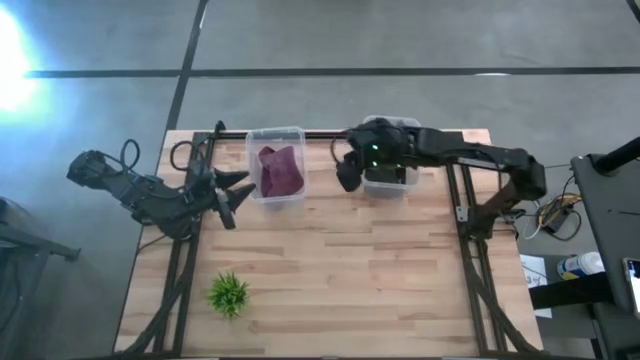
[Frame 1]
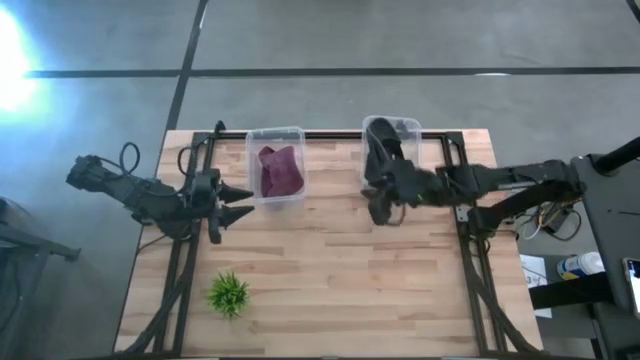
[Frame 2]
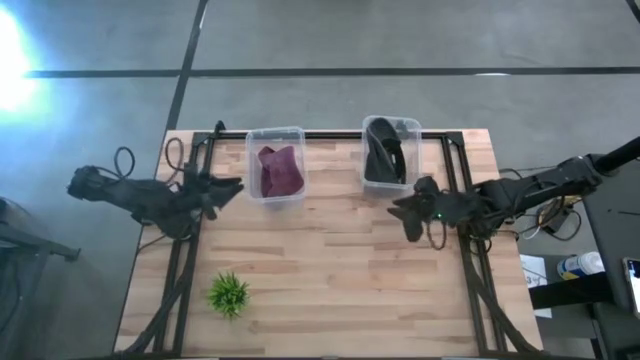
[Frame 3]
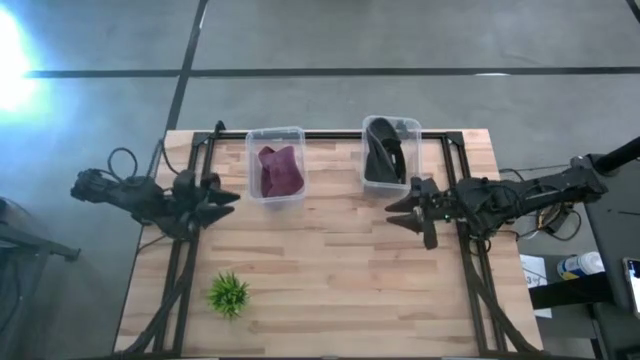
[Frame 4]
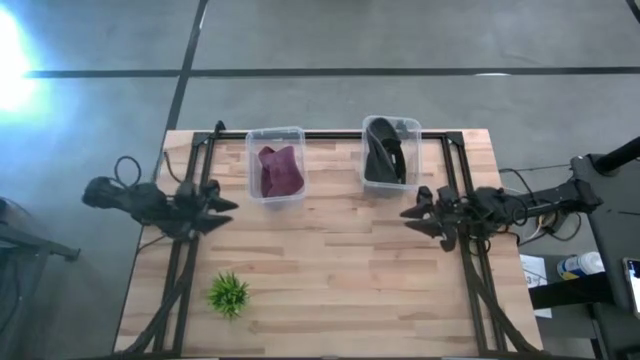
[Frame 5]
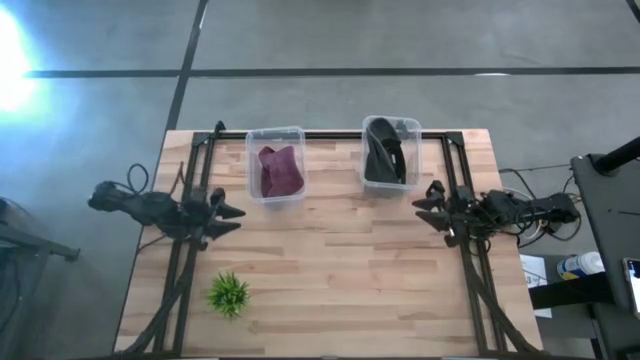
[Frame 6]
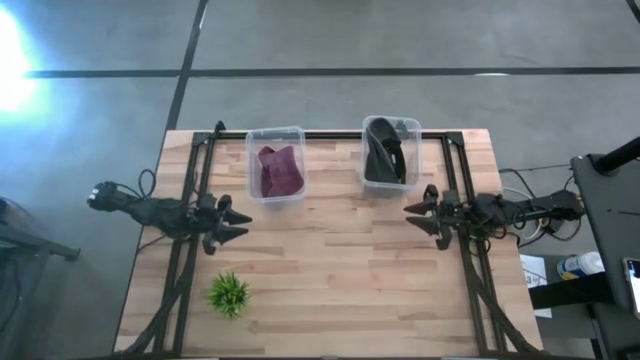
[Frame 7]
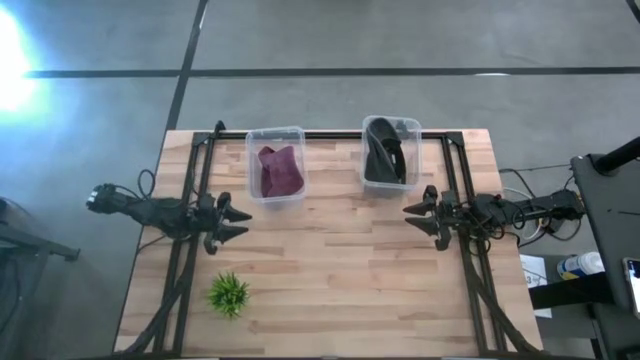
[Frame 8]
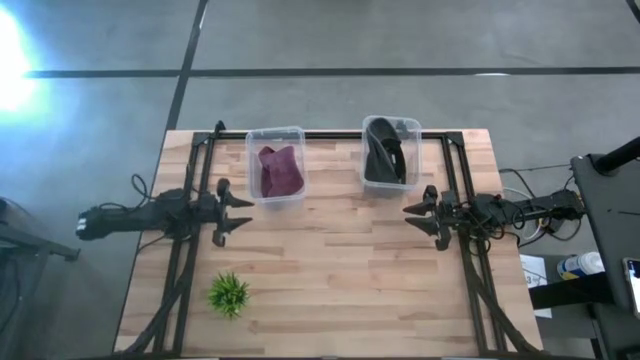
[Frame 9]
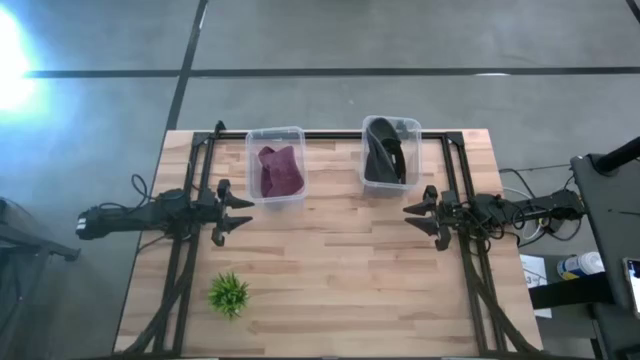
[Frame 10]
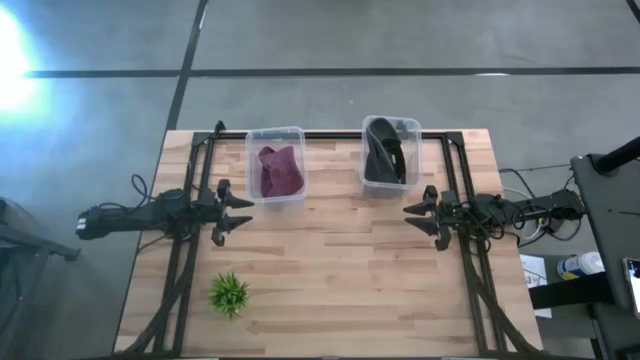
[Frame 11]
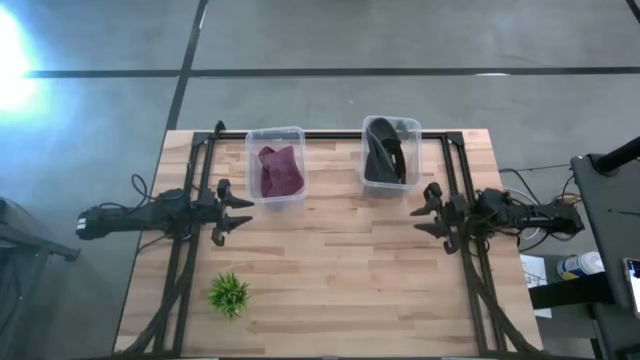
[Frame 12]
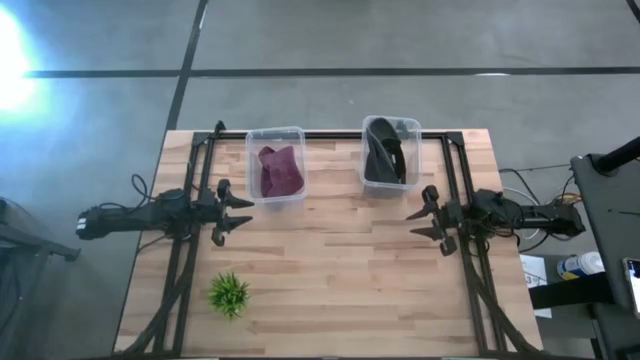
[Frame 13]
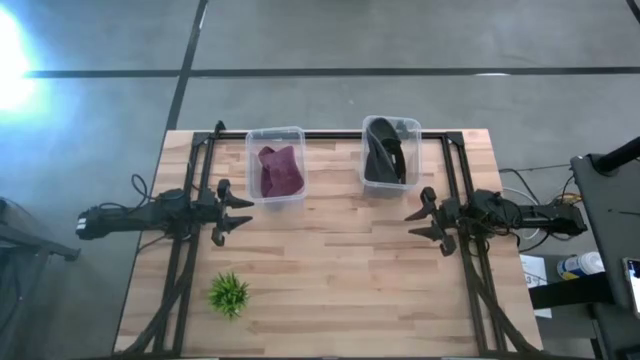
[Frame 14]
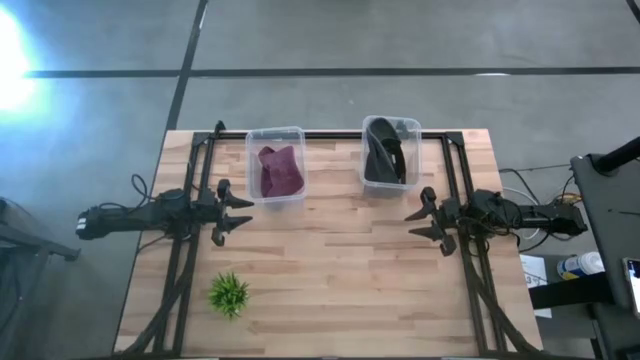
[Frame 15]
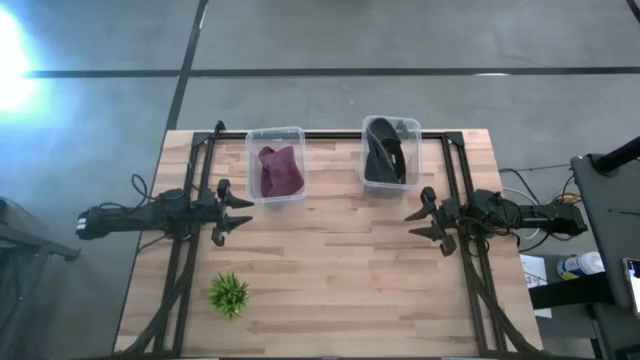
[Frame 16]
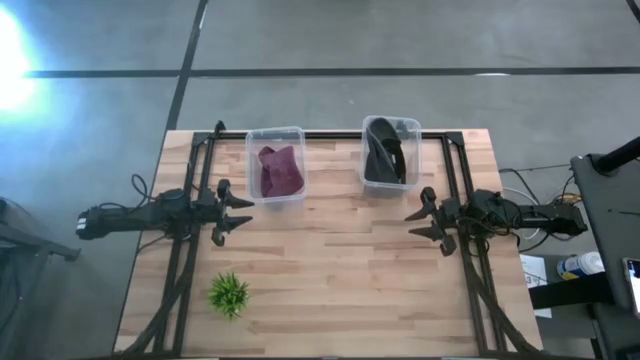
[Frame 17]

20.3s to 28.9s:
Task: Pick & Place hat
Return to Home Position

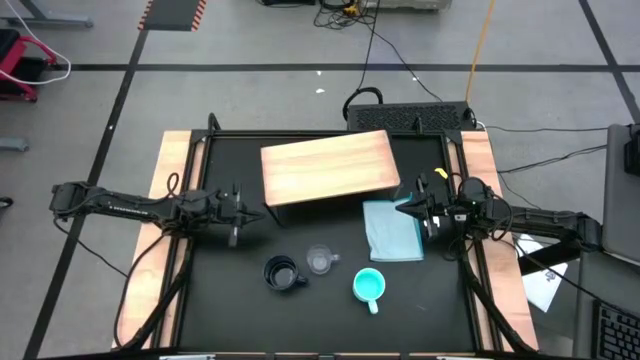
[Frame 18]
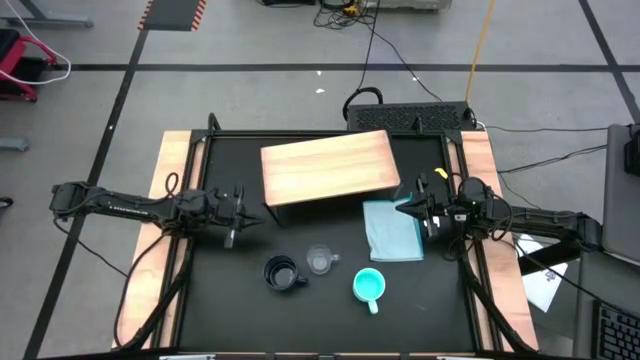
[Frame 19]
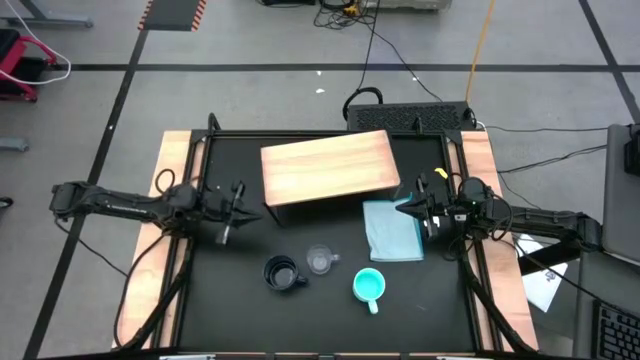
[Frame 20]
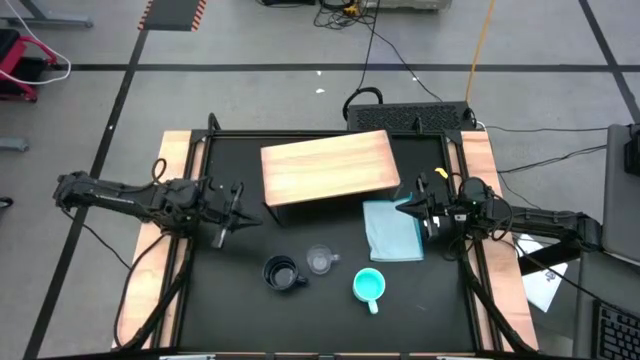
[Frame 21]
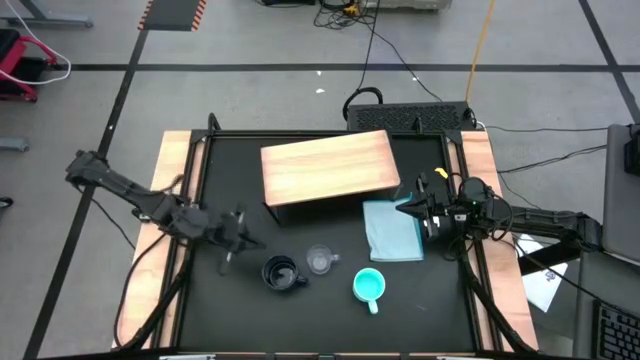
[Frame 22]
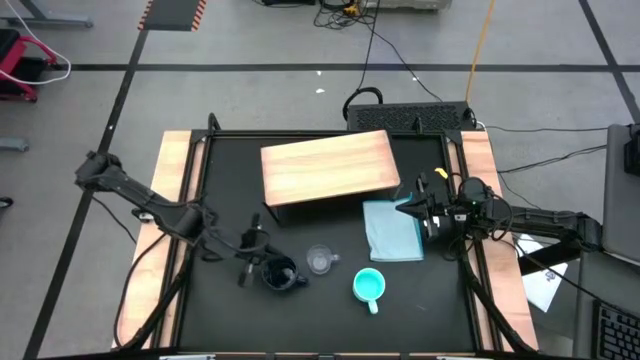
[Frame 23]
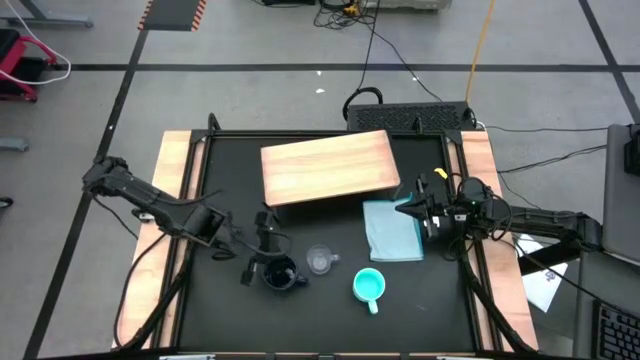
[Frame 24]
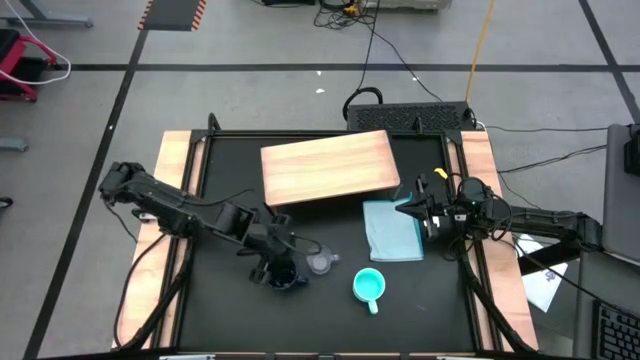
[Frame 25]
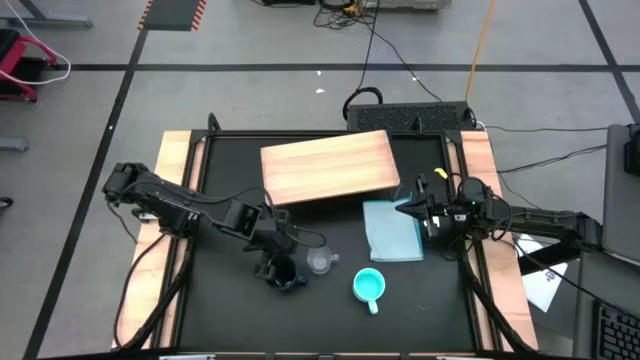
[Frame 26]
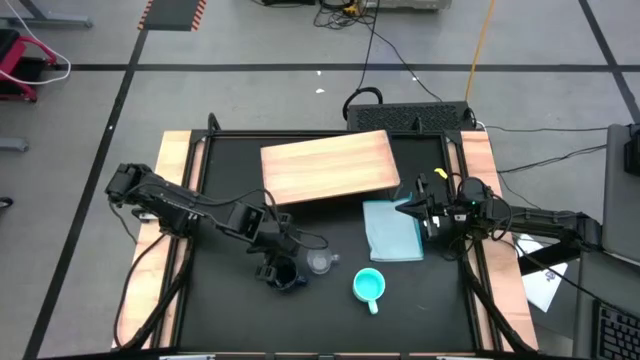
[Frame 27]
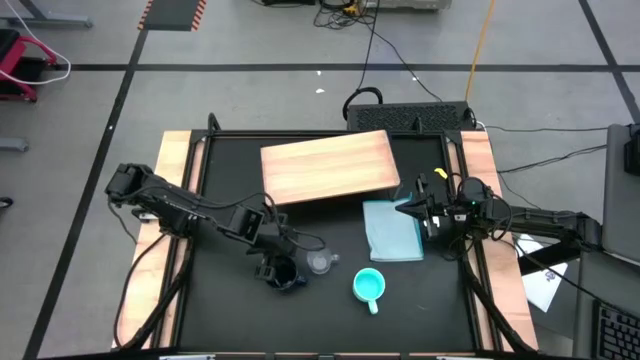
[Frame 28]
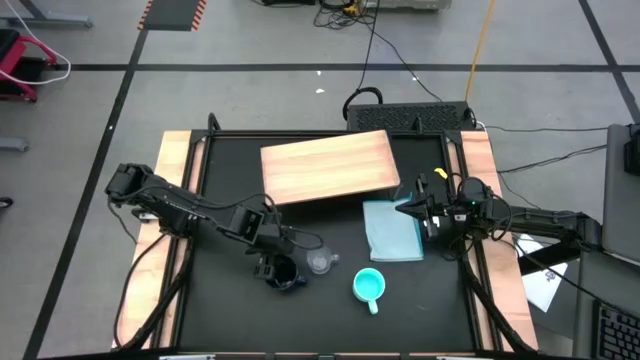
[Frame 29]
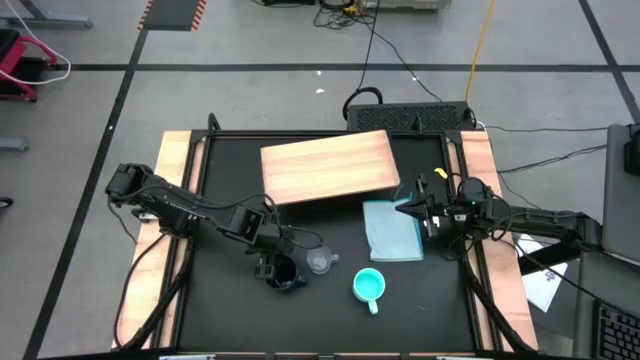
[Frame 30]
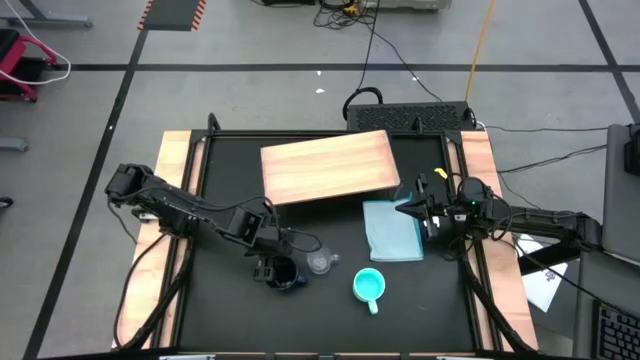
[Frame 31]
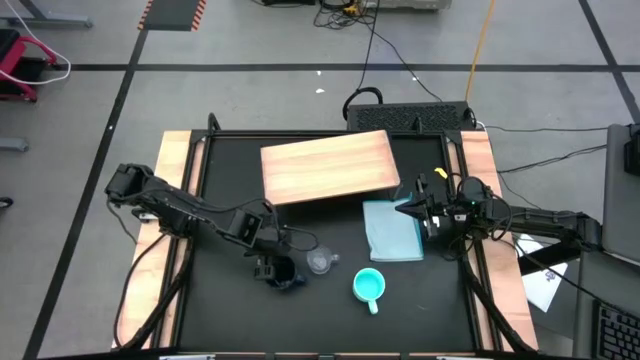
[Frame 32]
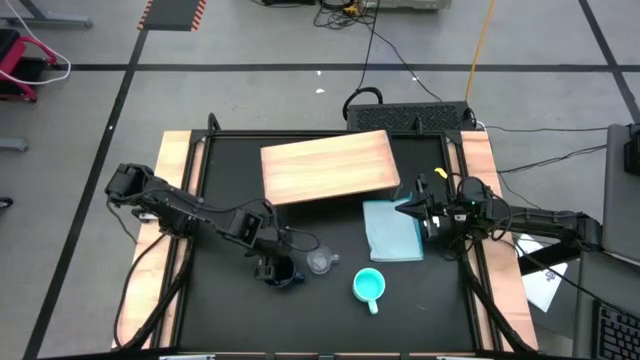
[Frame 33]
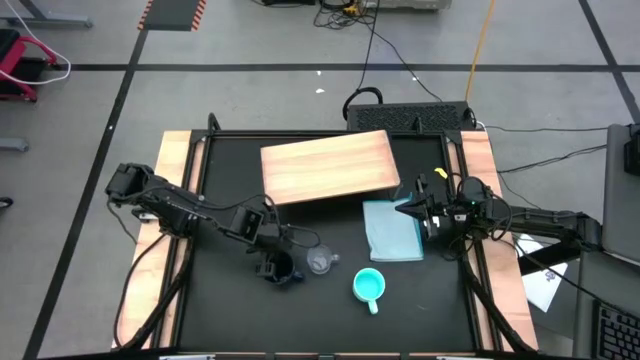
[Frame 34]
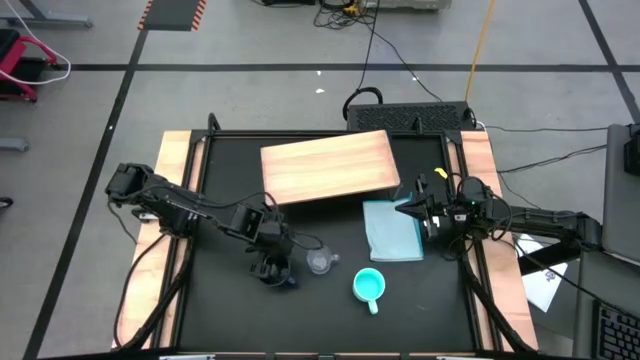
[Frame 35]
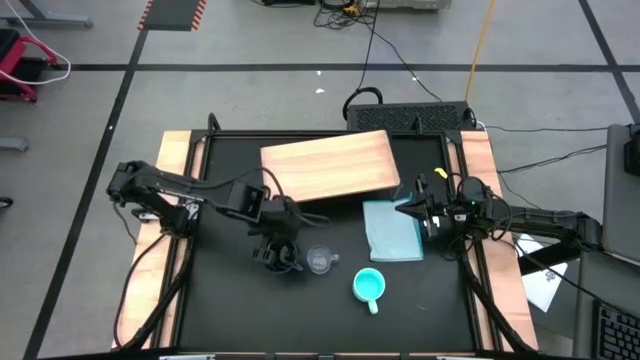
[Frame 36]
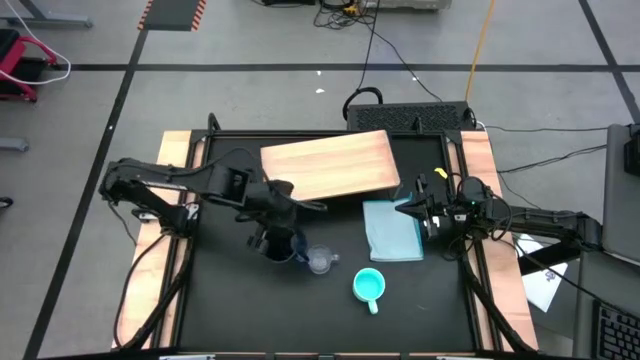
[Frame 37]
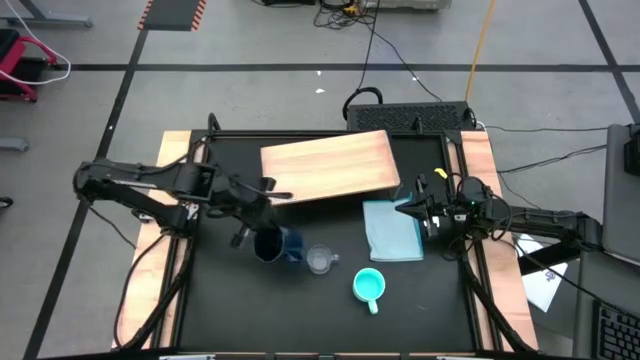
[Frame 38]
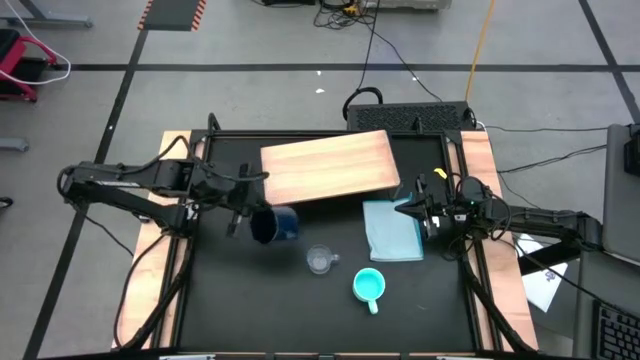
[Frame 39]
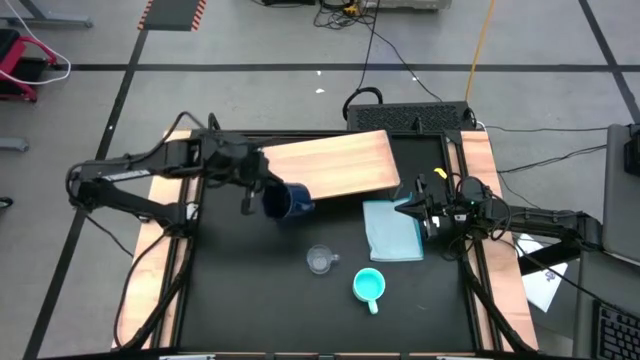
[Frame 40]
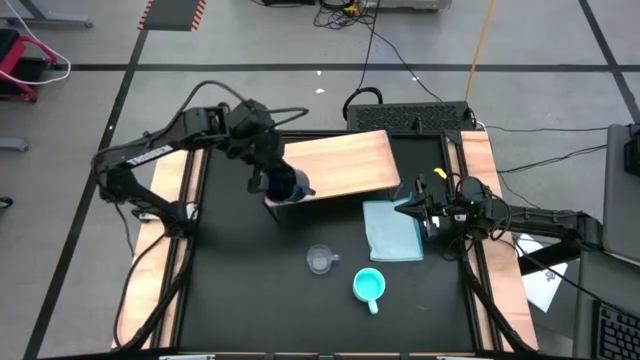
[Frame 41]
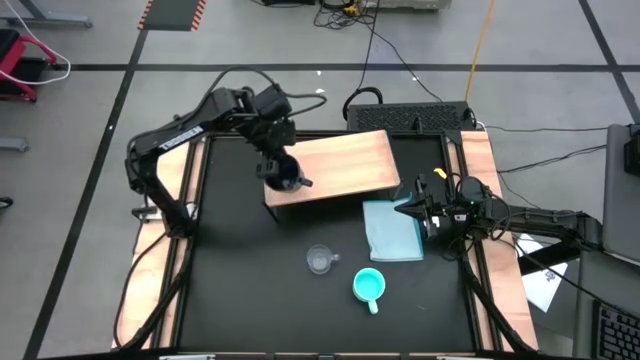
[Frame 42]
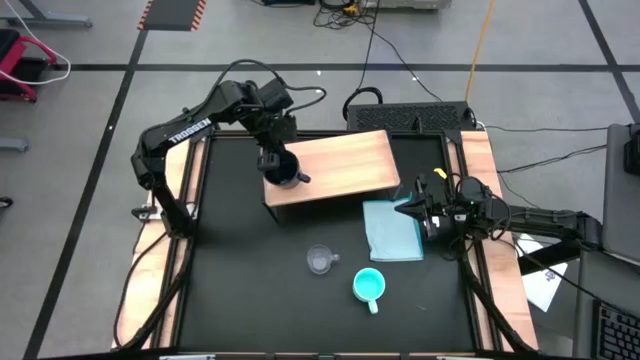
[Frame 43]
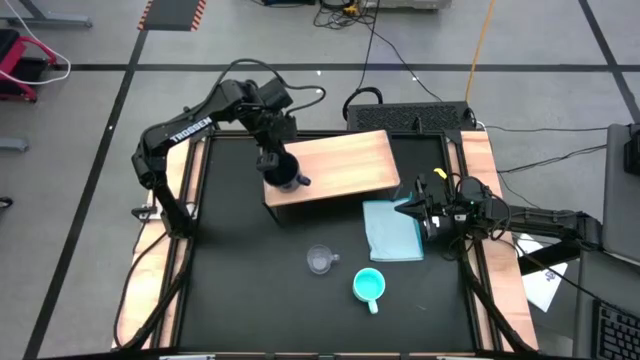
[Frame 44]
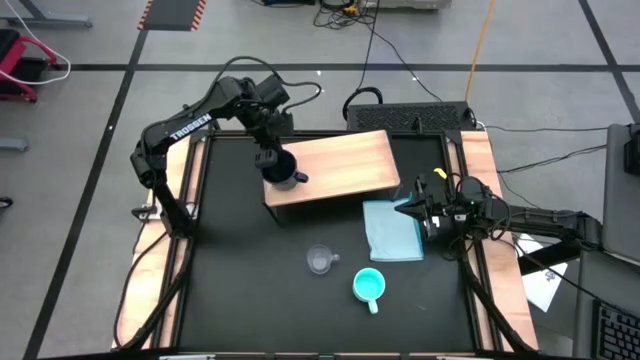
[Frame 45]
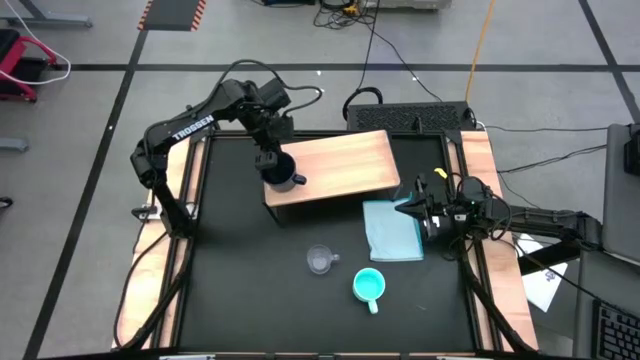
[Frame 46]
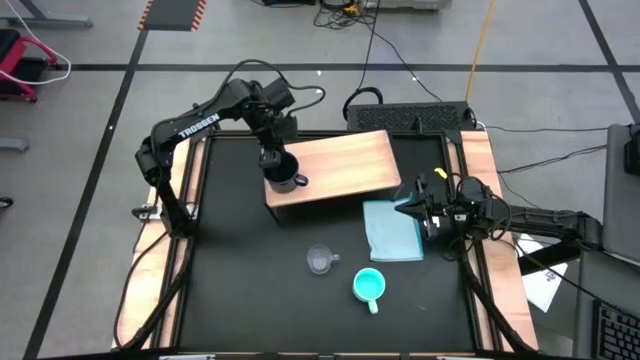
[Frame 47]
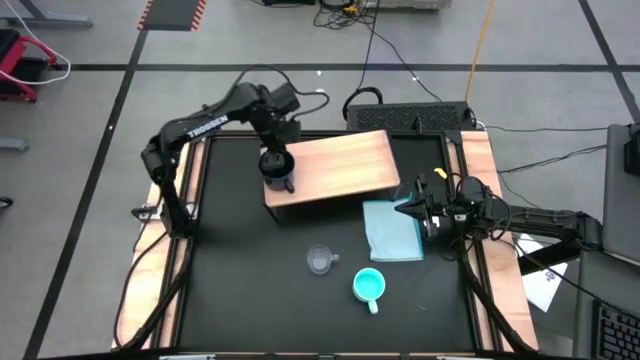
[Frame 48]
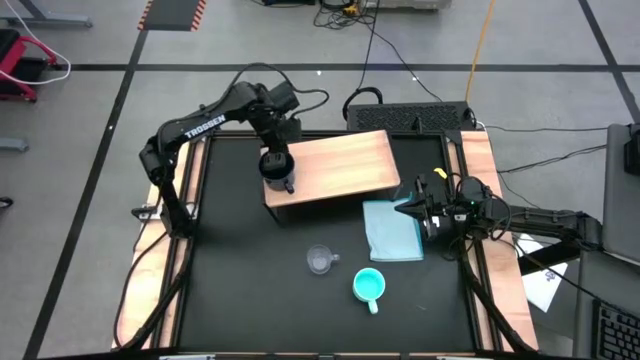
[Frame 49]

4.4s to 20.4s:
Task: Stack small to large cups/mugs on shelf
Put the dark blue mug on the shelf
